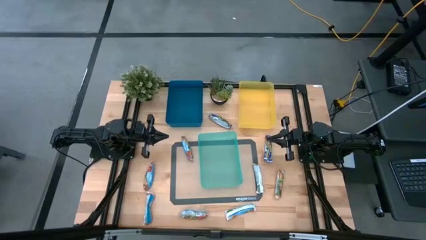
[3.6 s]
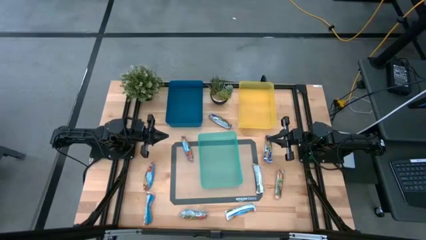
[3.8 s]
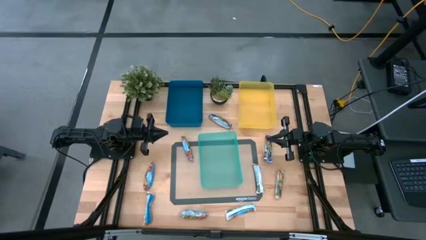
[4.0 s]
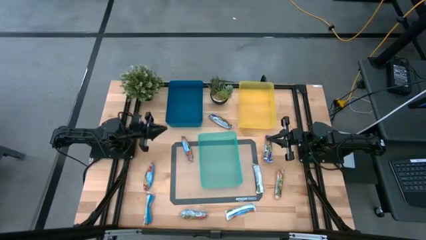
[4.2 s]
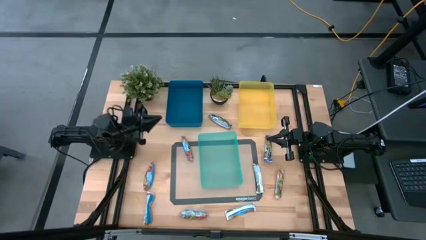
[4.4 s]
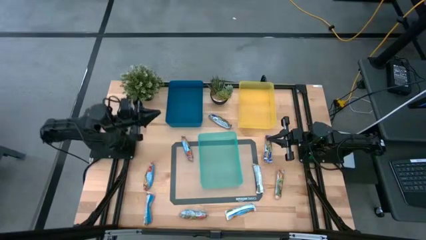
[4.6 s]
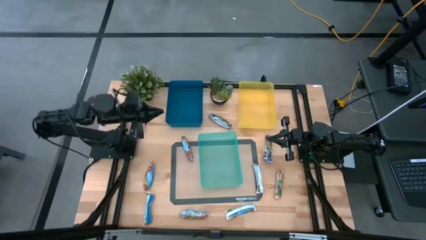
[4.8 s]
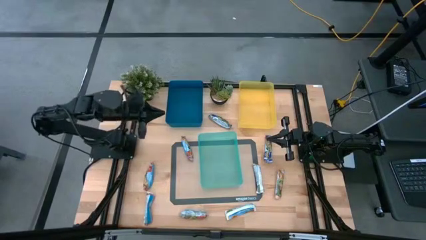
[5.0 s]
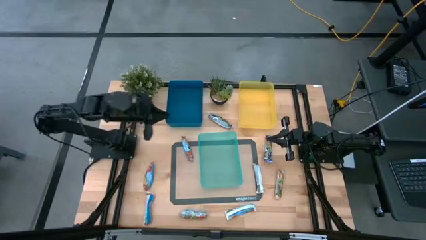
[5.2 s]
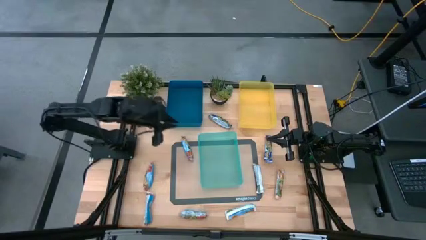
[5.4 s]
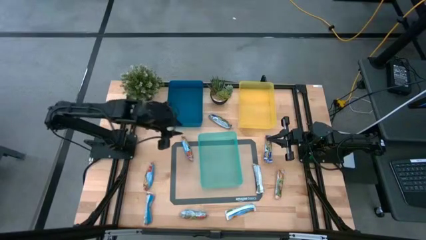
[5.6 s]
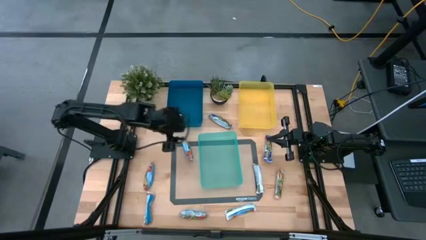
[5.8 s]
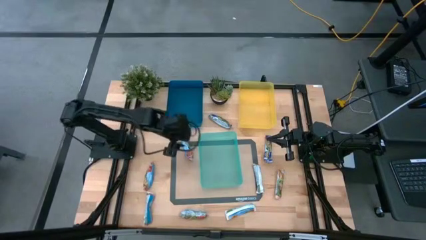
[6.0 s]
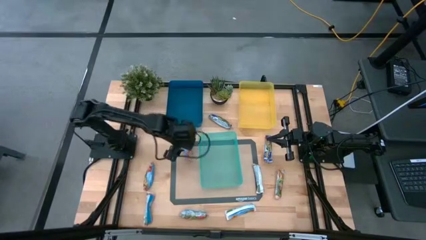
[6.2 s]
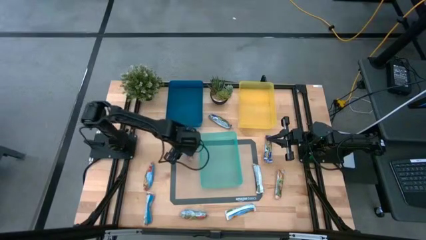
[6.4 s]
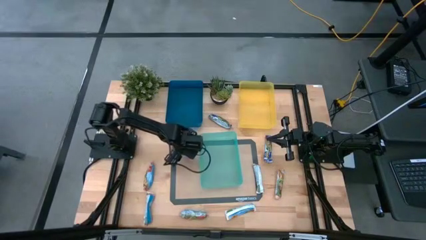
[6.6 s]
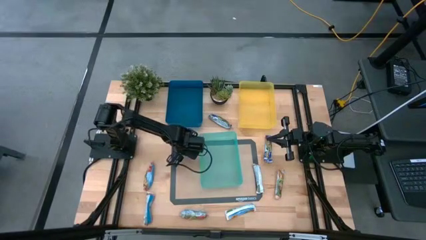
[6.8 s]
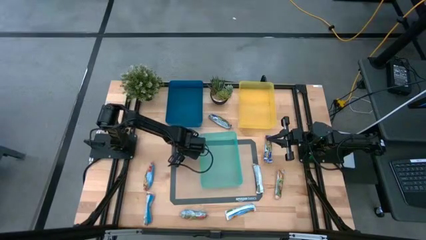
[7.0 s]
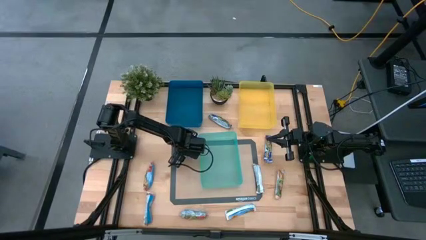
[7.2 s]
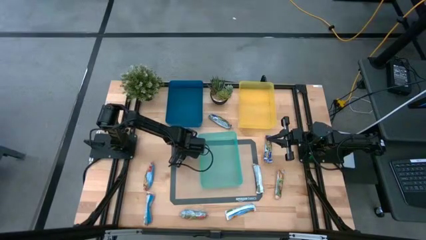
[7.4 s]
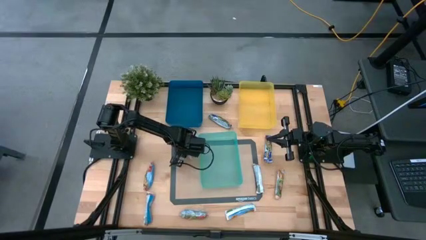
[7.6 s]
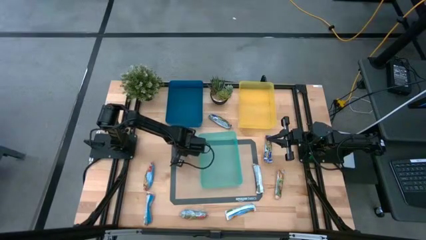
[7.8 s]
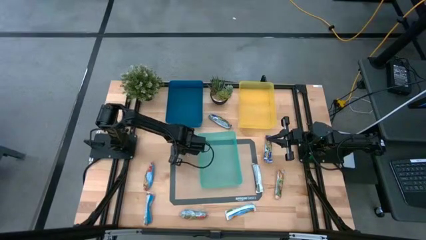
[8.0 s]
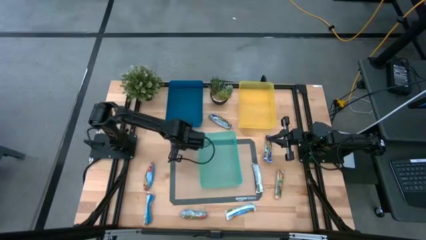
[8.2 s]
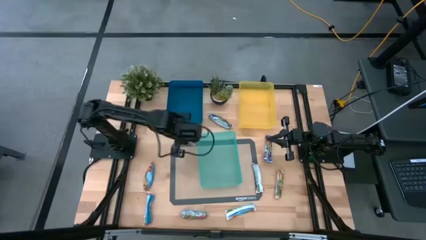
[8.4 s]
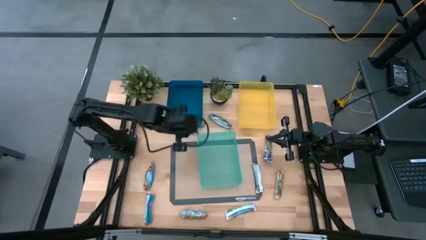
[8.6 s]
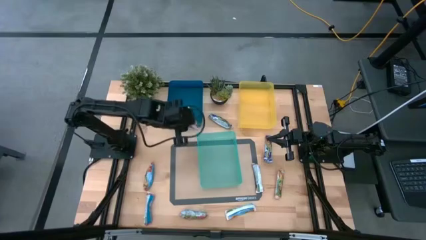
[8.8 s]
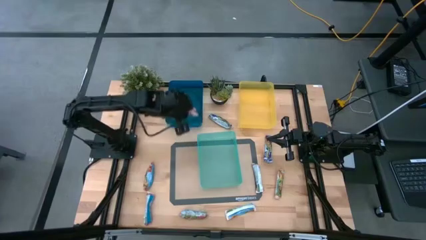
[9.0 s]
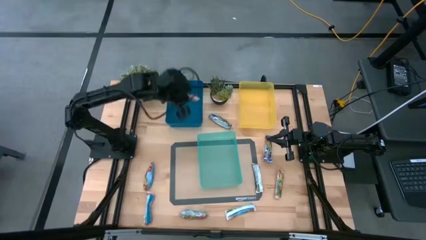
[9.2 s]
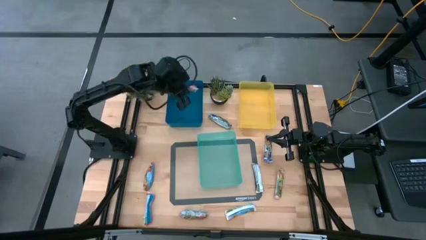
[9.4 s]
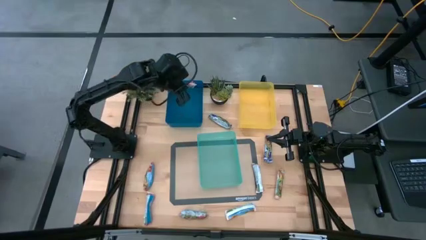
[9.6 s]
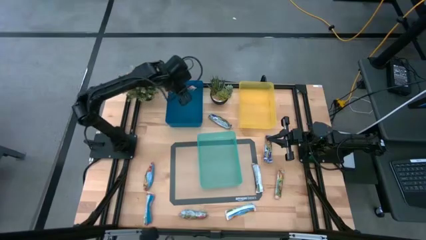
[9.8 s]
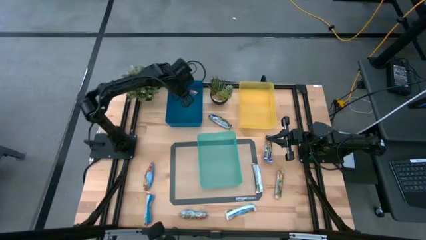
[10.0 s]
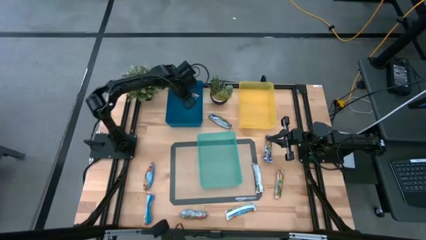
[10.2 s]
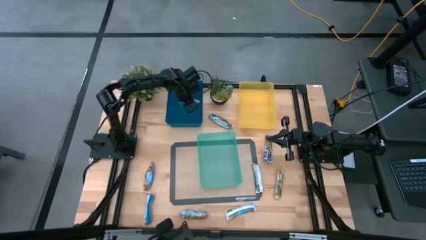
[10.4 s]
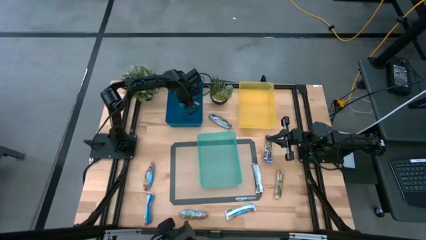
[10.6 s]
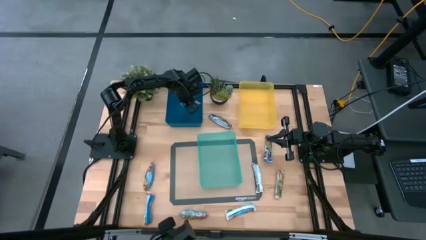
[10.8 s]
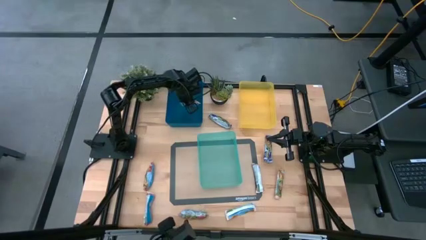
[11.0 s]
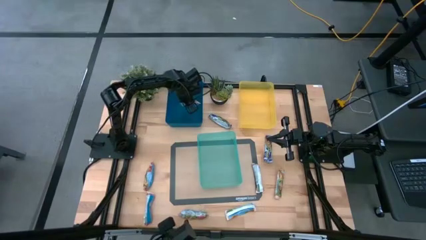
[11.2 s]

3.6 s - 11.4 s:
Task: Pick and place Granola Bars by type
Put the red granola bar into the dark blue bin

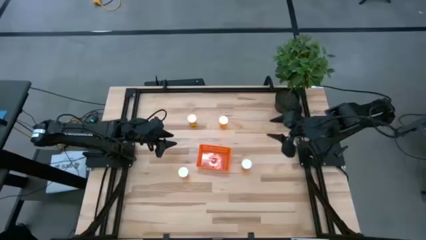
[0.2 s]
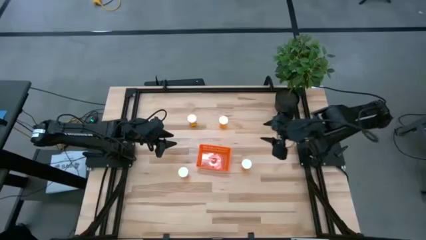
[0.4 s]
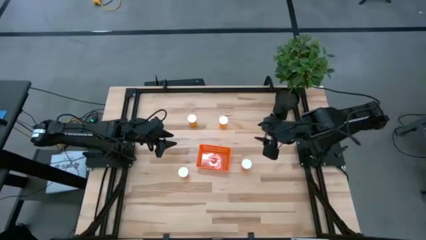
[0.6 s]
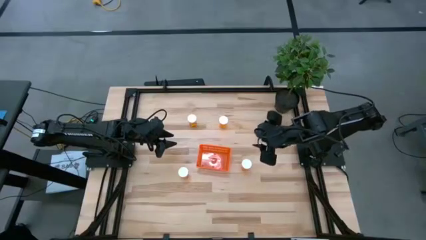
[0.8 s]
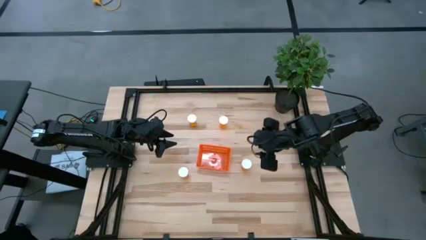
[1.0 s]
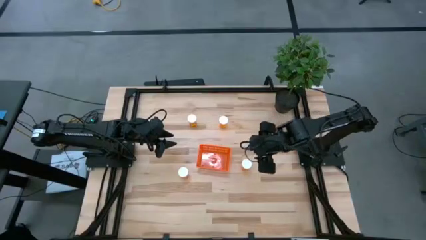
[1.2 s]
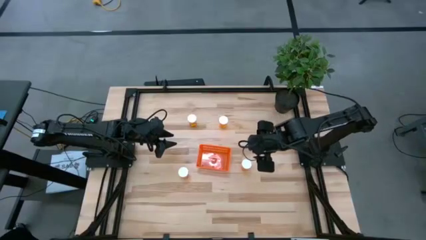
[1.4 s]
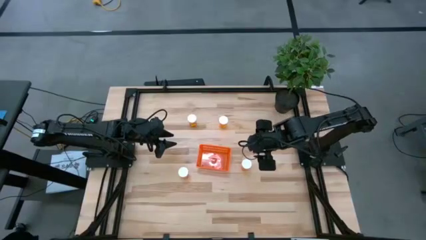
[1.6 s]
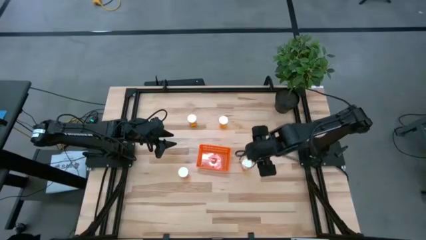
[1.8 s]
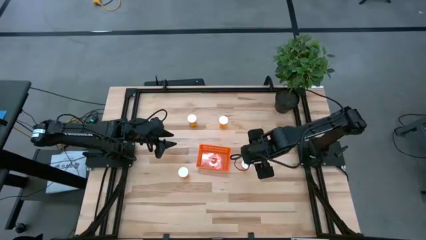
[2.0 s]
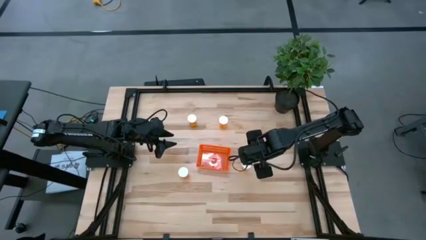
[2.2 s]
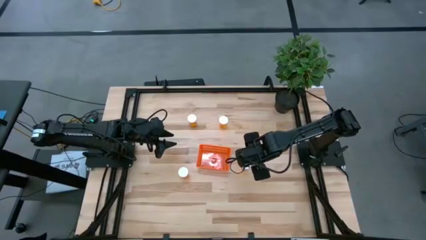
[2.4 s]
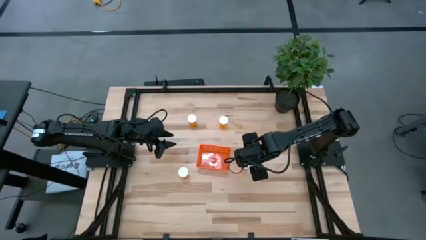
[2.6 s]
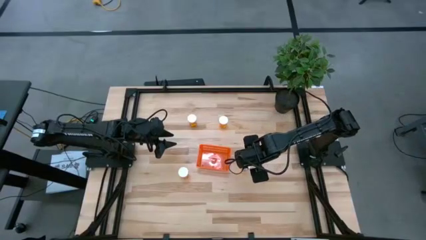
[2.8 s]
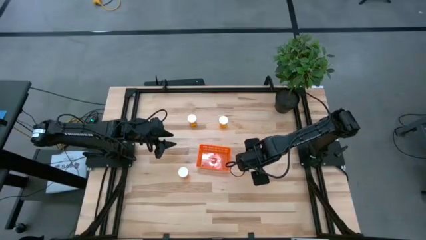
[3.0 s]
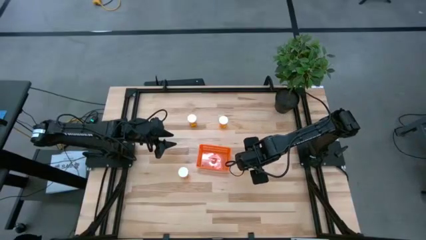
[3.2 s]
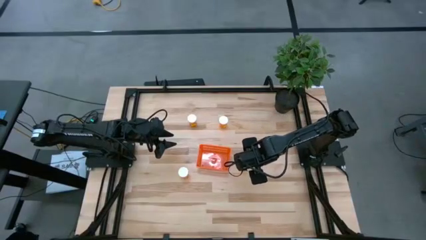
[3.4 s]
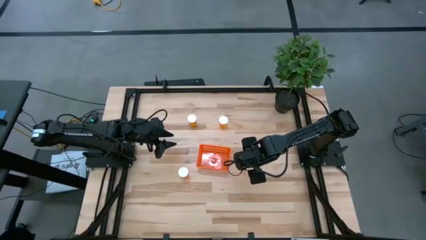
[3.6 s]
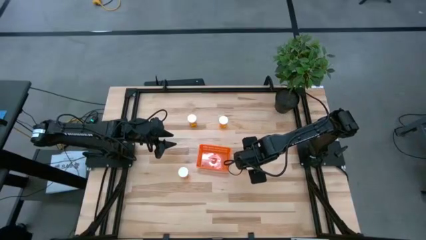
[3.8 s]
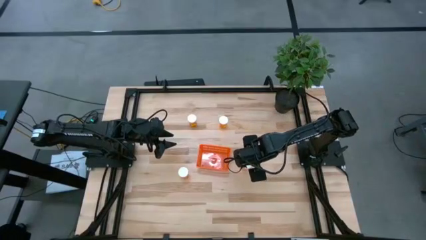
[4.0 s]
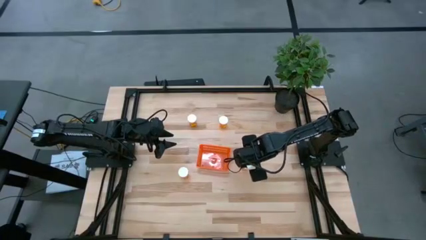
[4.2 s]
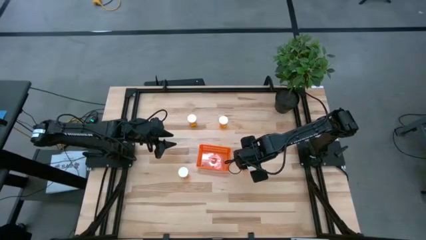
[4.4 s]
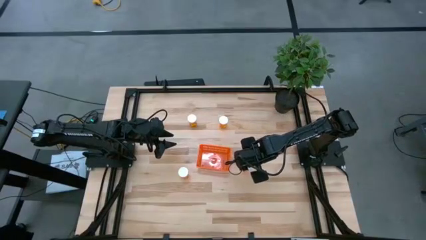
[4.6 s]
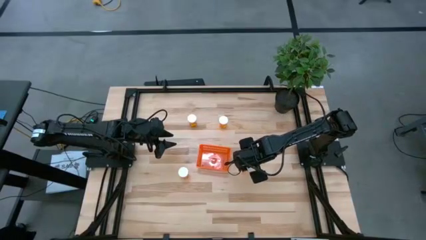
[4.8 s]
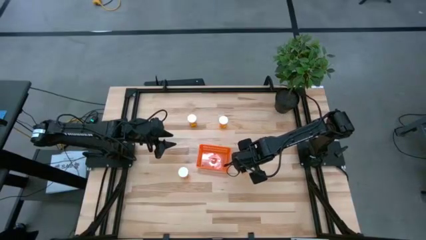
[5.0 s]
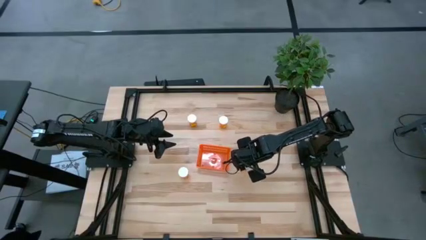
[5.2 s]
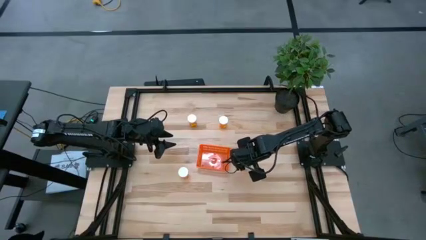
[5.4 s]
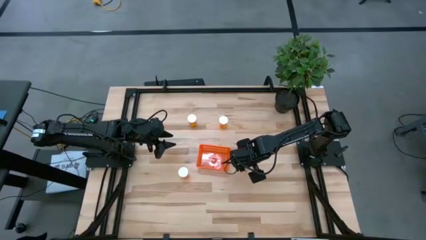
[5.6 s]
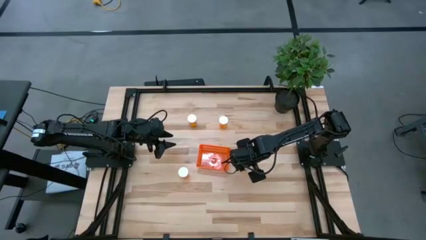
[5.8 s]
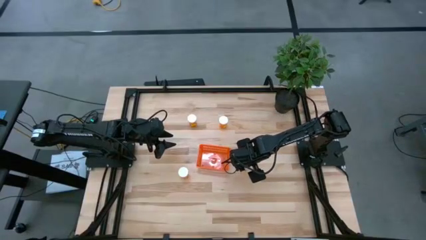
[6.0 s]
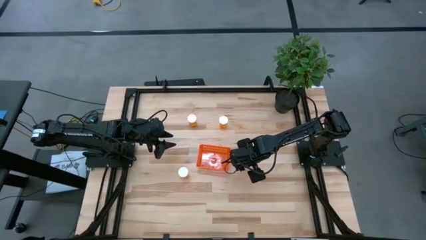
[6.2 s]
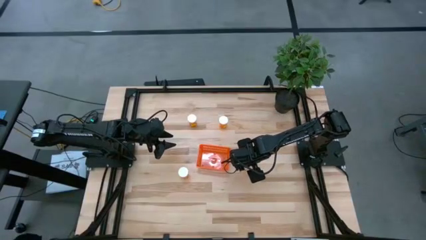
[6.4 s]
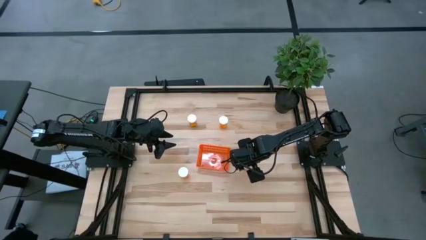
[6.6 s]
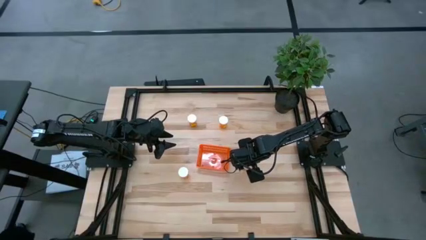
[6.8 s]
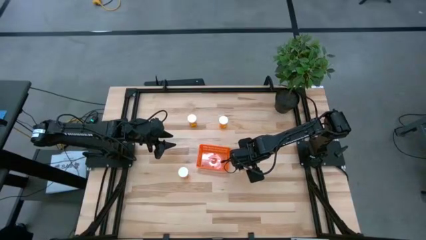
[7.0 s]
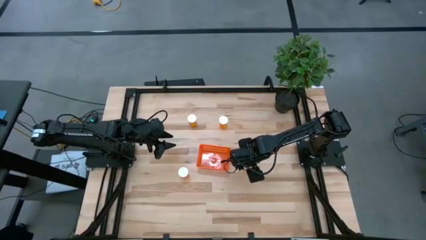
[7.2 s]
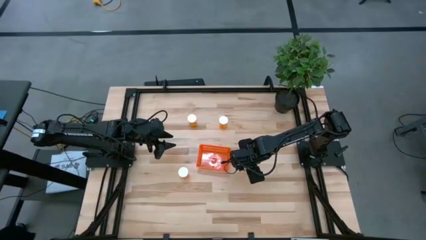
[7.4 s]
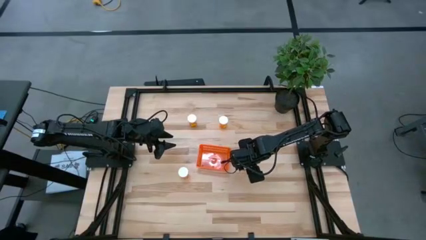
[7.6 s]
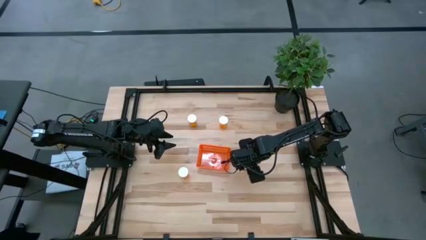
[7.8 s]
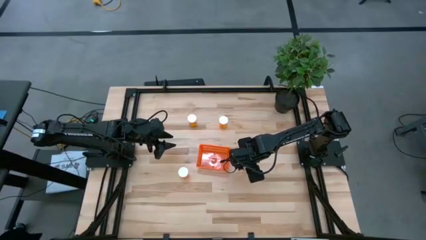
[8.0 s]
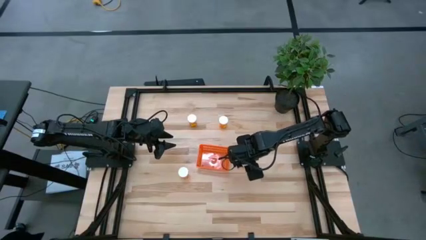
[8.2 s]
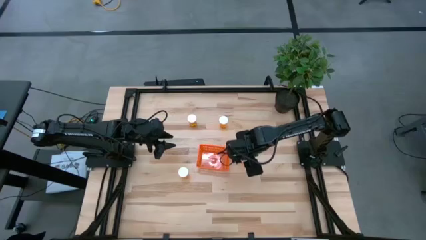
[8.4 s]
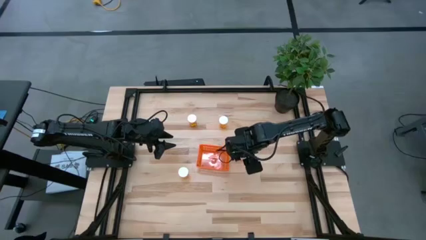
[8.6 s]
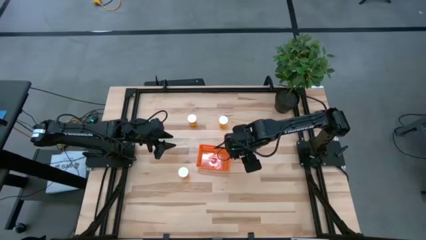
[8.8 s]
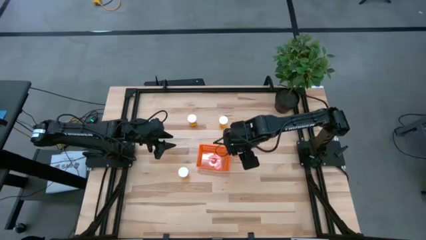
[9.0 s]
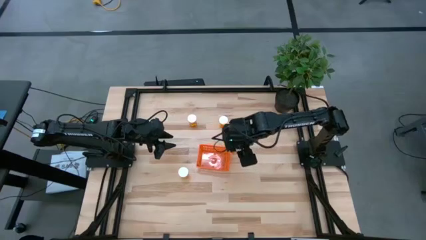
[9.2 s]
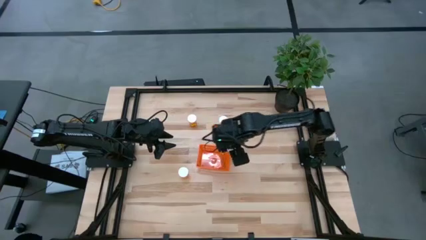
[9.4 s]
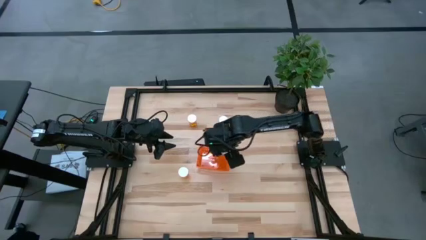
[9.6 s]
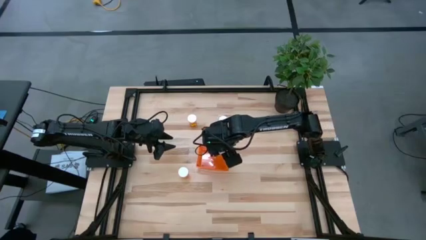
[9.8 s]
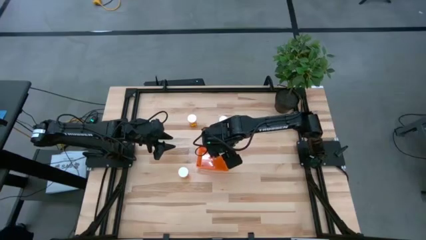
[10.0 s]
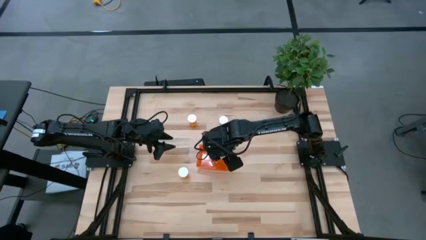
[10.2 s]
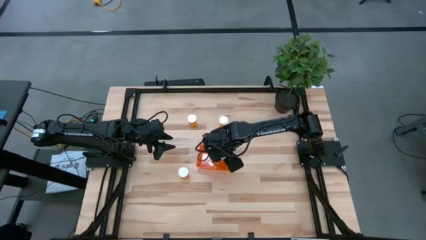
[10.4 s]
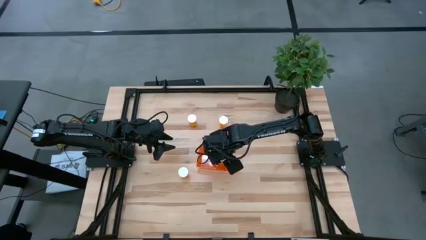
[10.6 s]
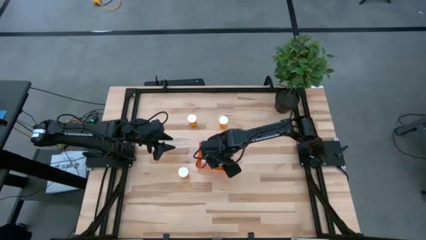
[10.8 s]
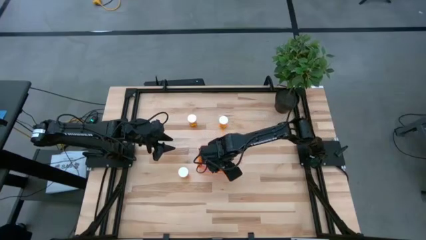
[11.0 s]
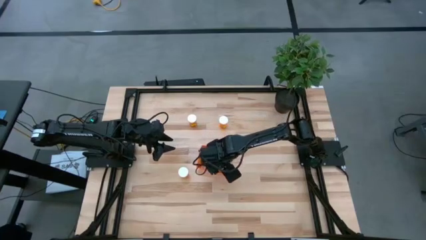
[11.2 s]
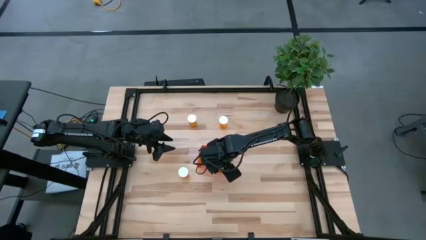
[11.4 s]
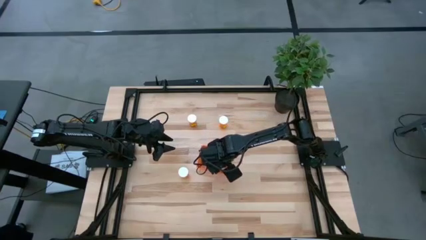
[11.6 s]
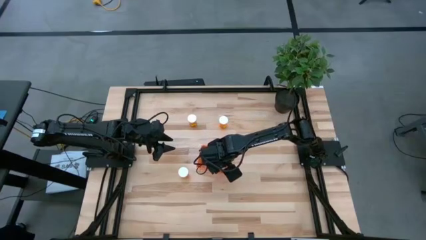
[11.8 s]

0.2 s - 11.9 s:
Task: Pick and place pill bottles into a basket
Put the orange pill bottle into the orange bin
